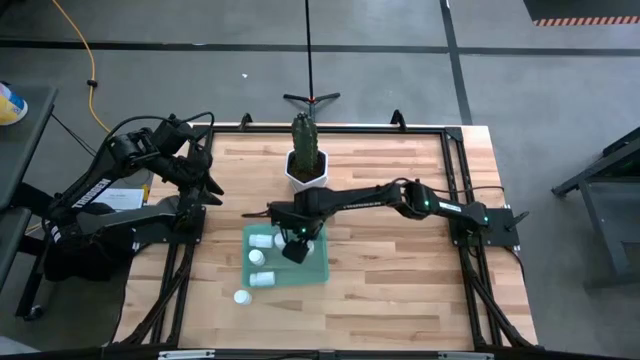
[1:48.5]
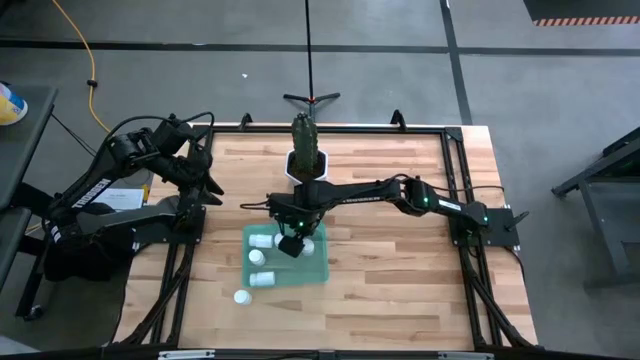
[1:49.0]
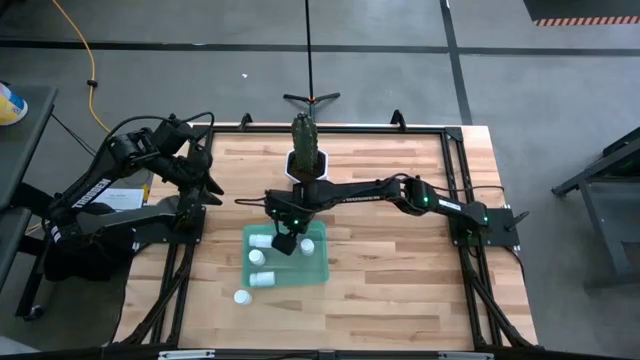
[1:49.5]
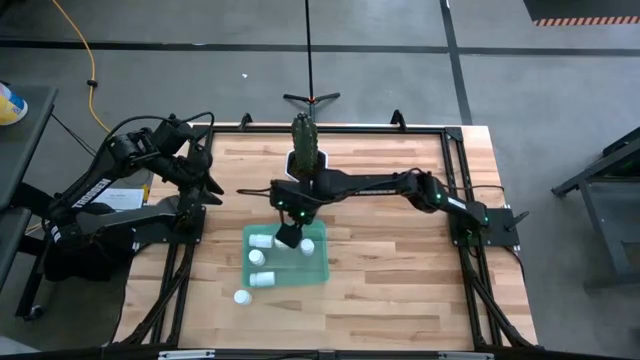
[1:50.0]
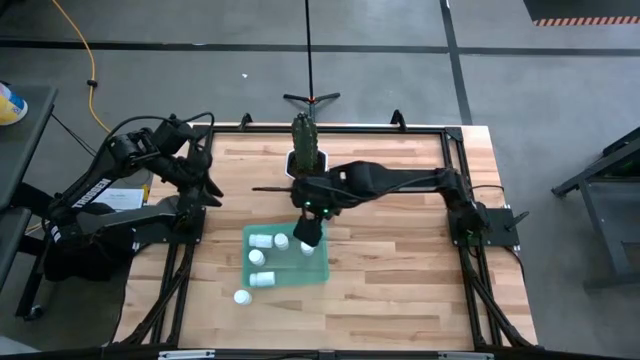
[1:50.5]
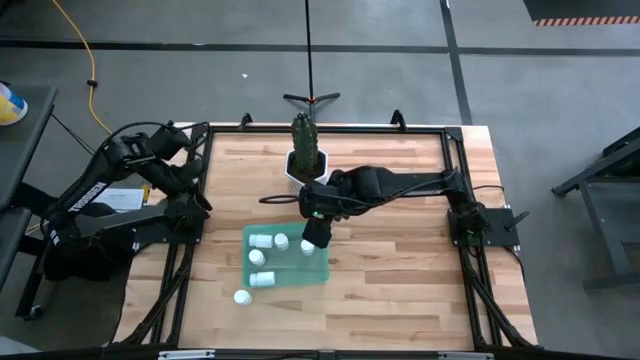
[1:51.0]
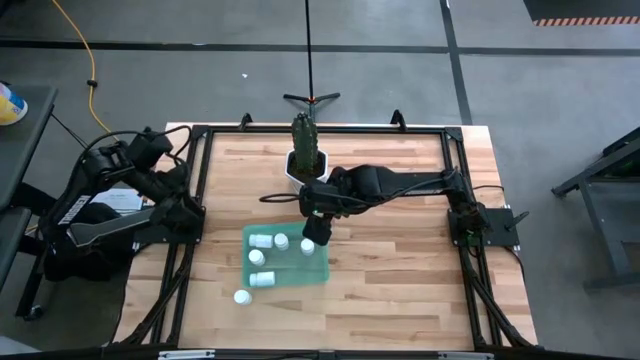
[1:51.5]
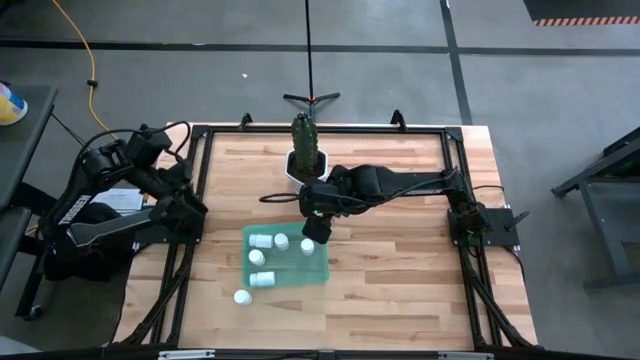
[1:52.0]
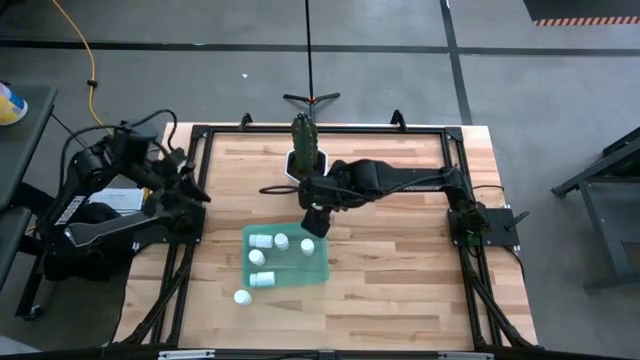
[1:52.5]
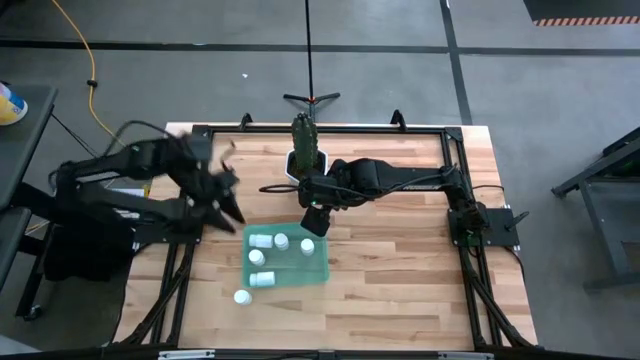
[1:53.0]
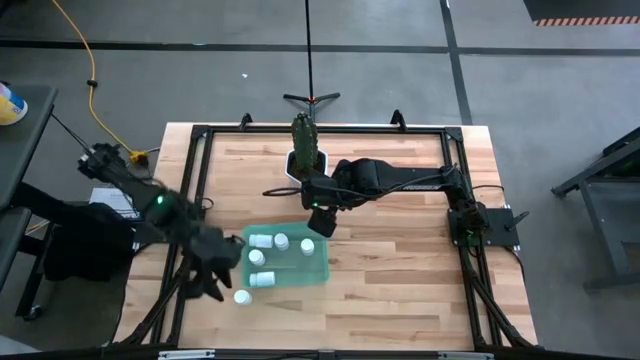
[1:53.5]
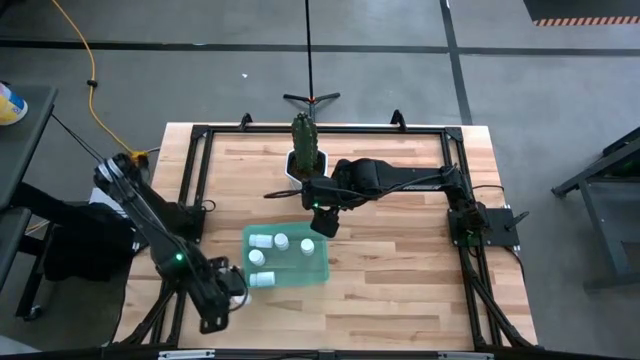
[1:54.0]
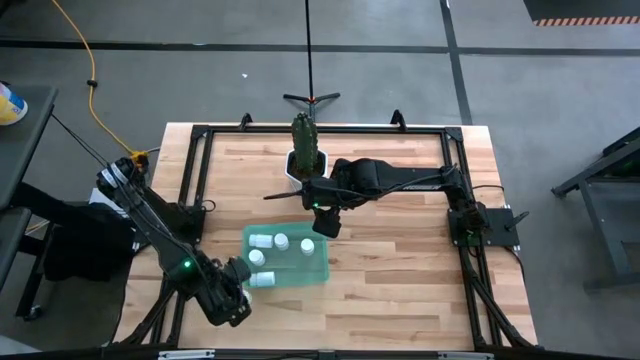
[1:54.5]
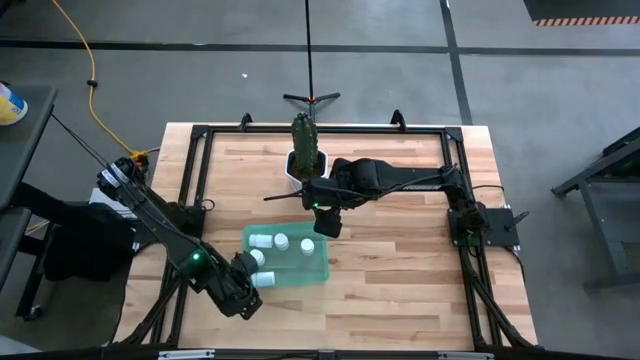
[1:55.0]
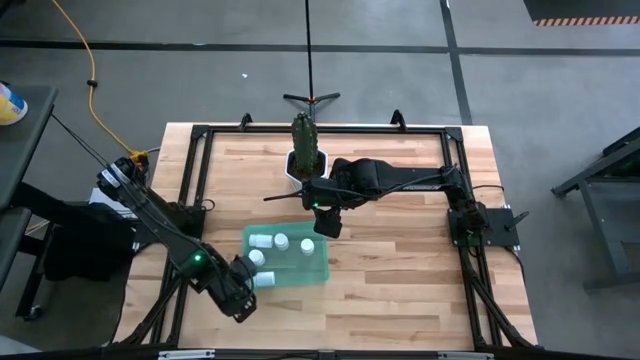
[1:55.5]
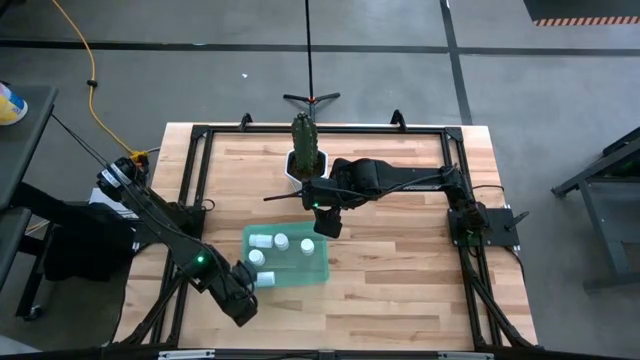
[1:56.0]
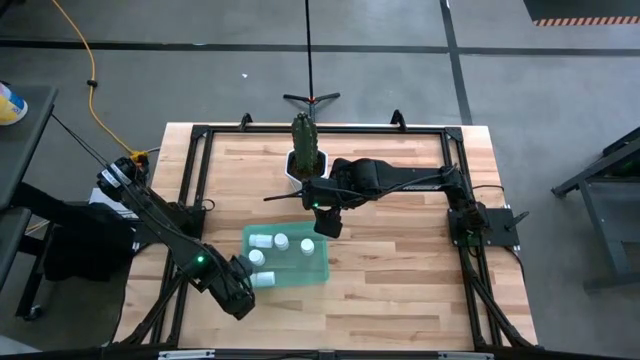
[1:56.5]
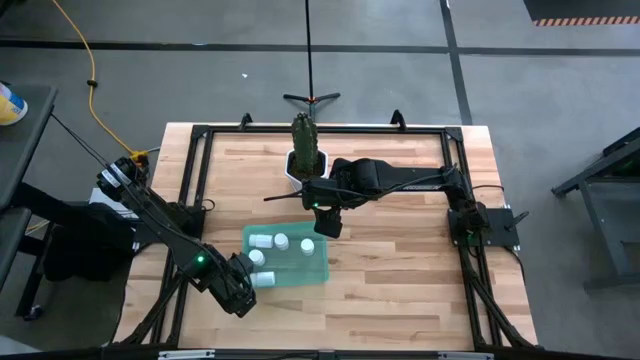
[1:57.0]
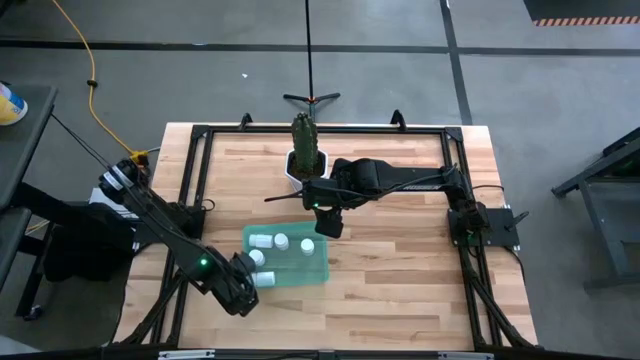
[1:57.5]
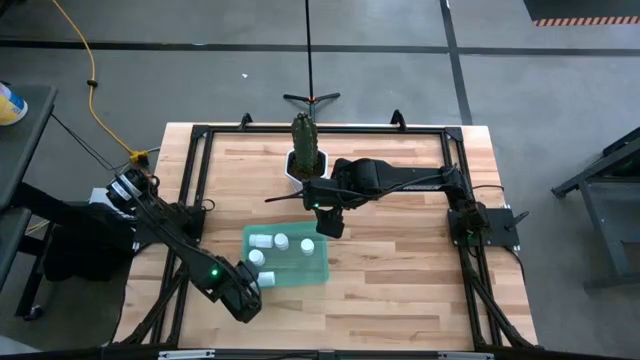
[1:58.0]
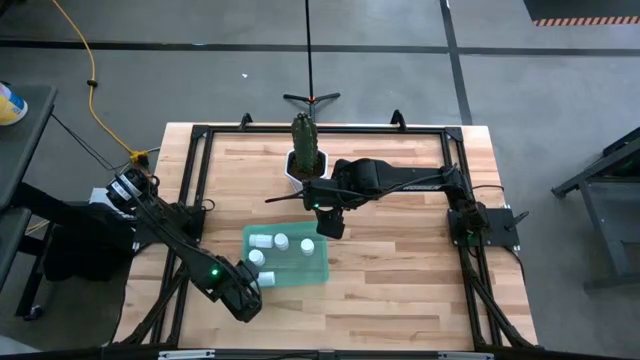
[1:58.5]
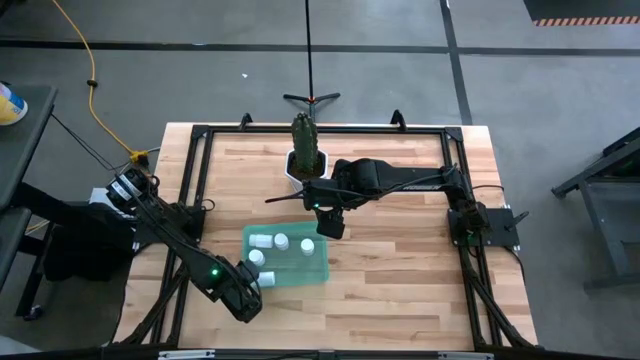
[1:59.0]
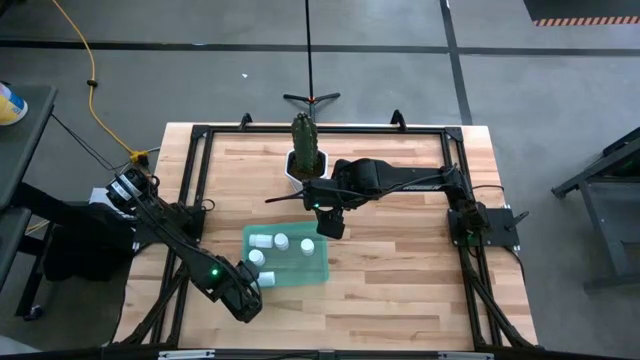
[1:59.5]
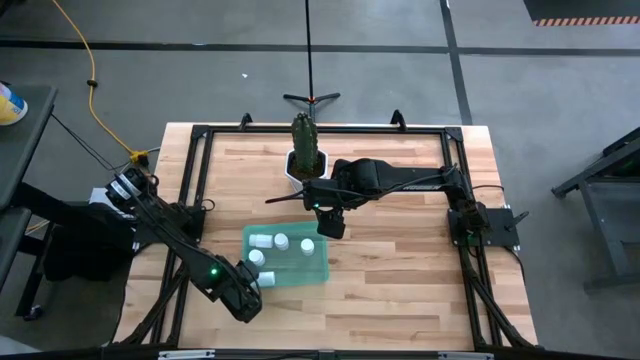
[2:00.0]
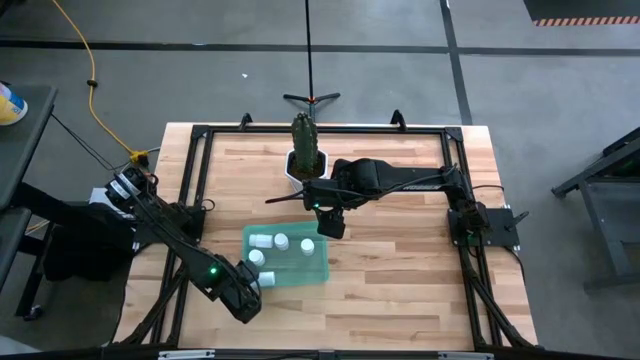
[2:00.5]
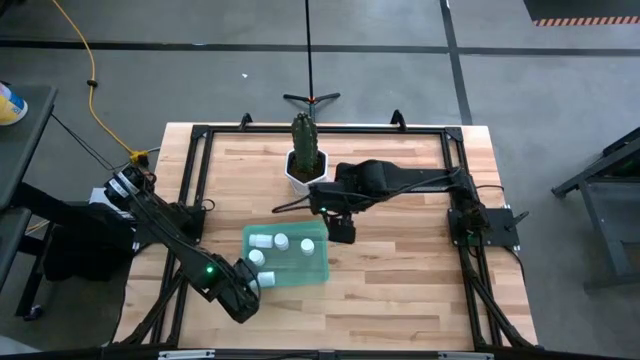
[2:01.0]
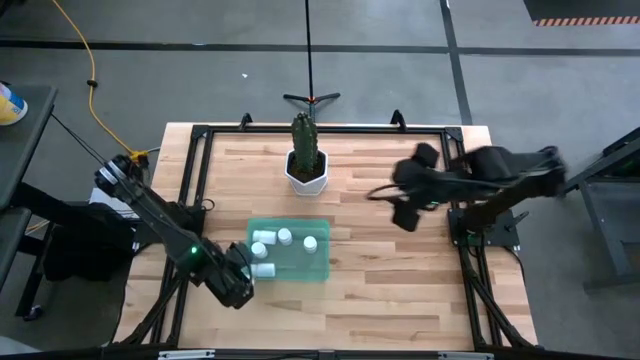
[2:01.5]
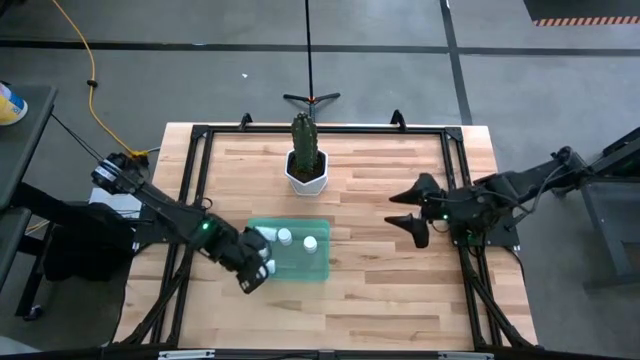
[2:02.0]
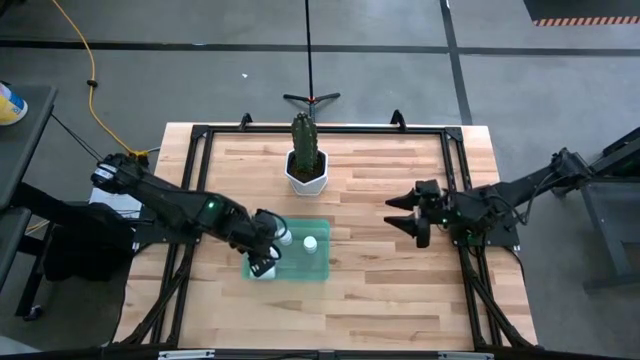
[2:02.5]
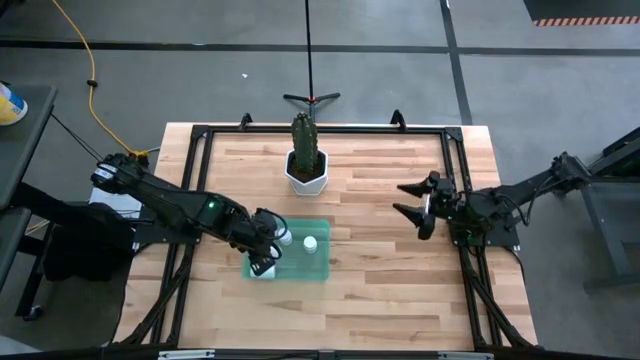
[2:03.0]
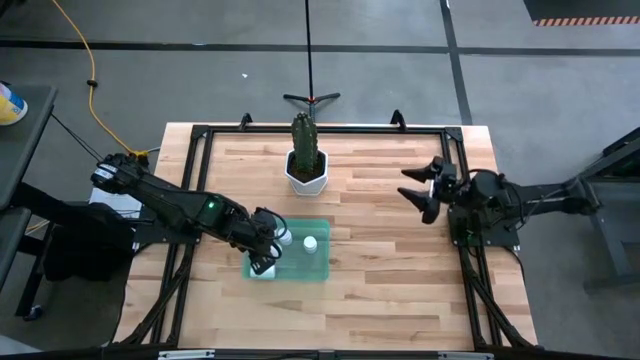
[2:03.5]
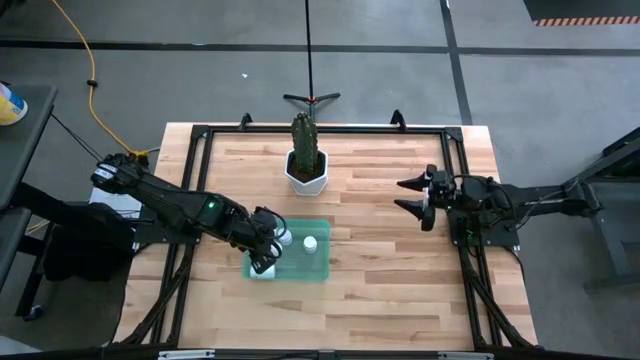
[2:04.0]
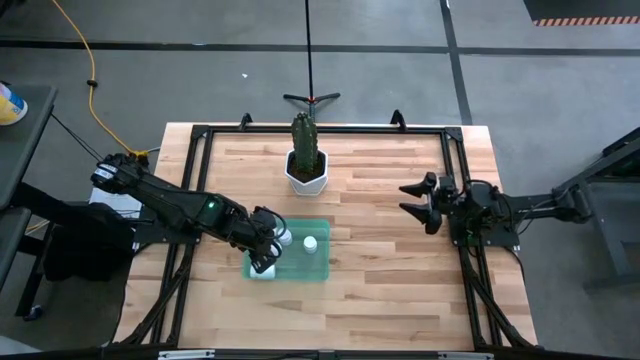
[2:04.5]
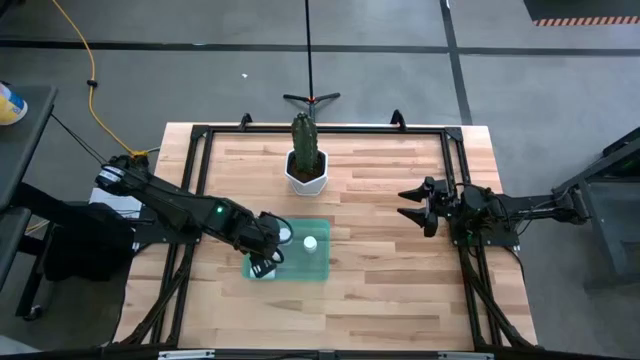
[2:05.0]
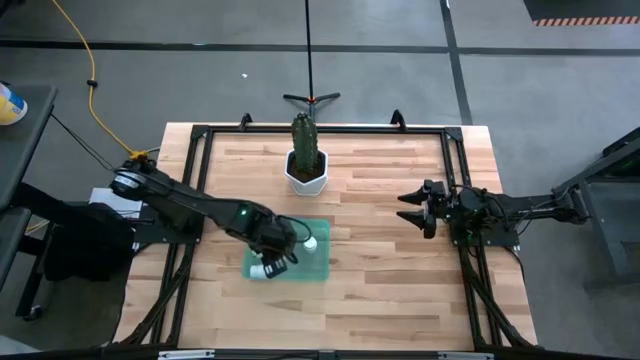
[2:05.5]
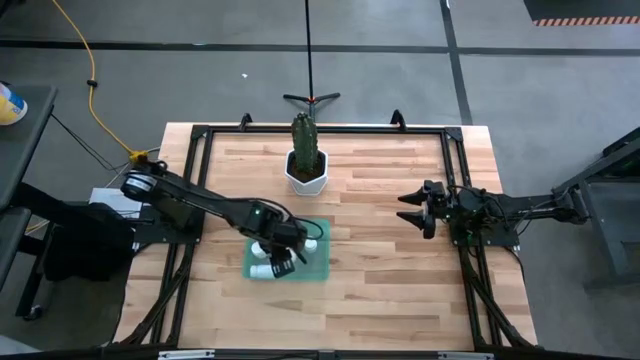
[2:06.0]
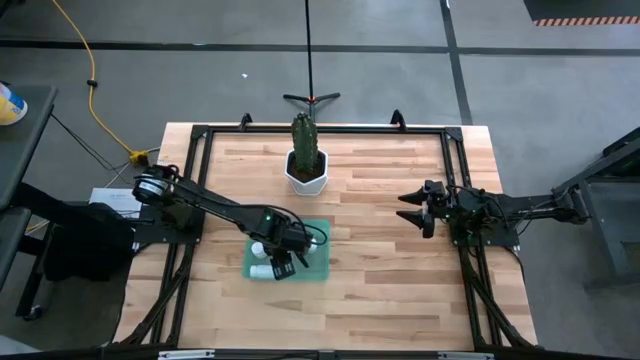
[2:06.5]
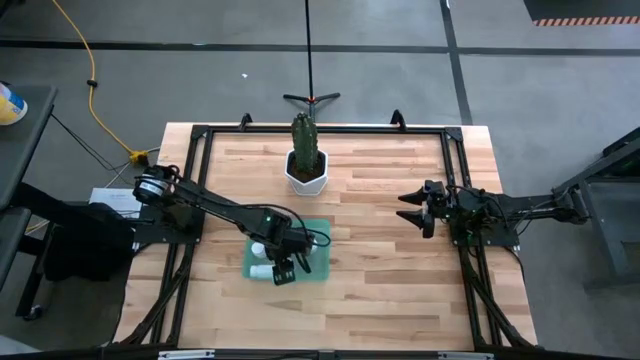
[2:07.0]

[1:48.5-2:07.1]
Task: Pick and place pill bottles into a basket
Put the white pill bottle into the green bin

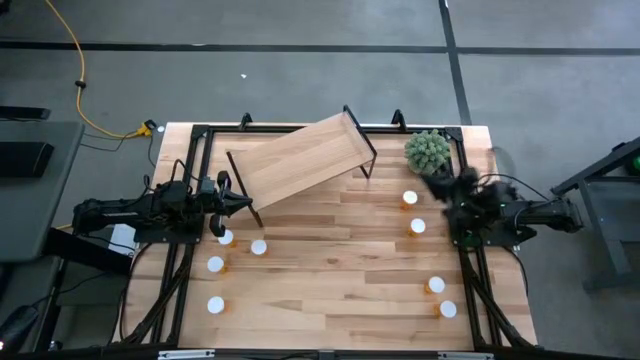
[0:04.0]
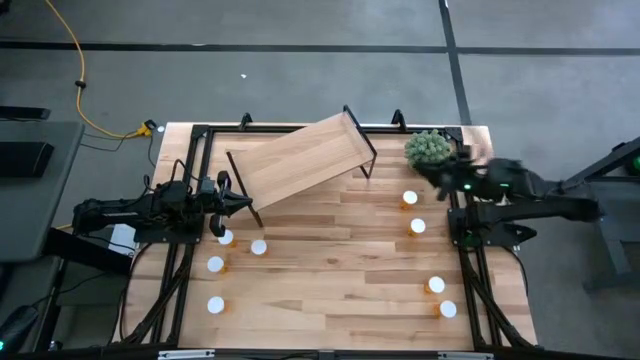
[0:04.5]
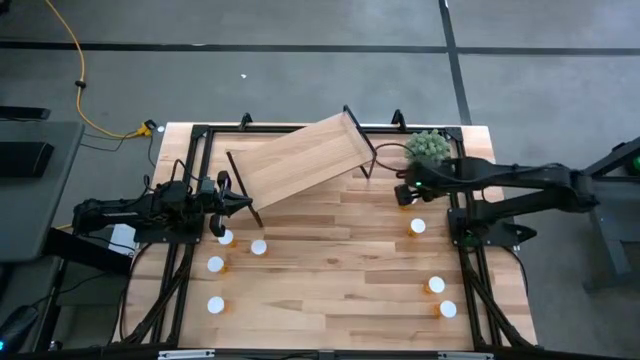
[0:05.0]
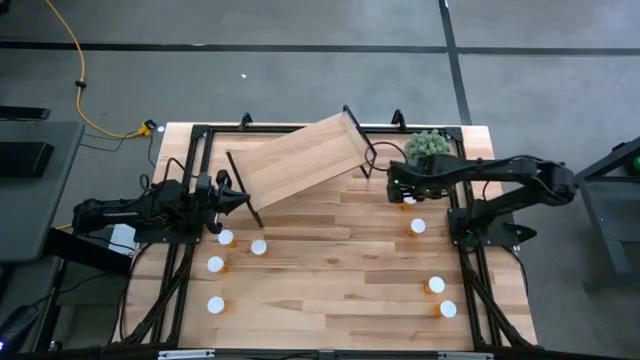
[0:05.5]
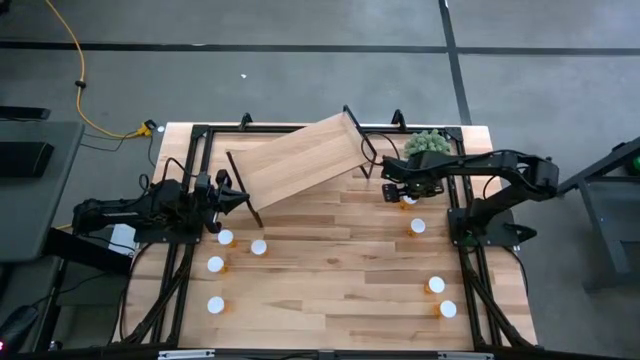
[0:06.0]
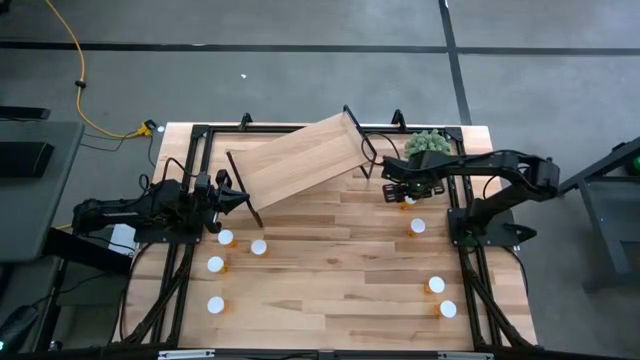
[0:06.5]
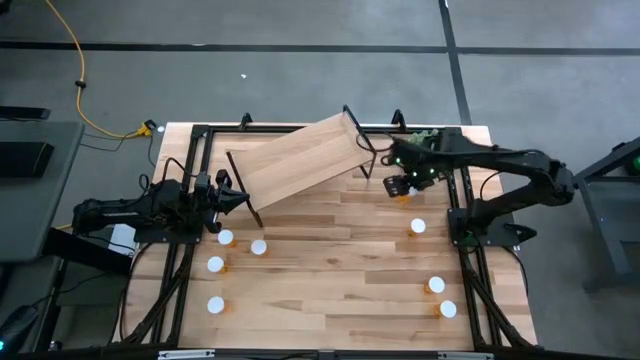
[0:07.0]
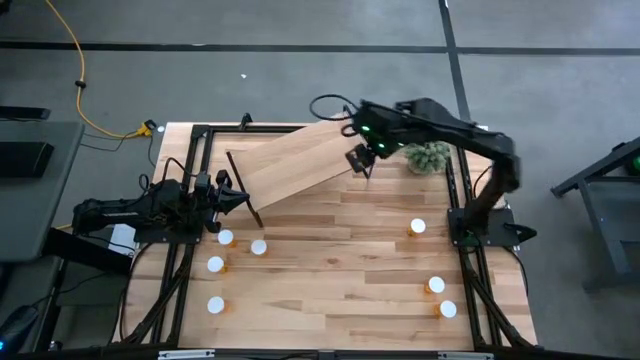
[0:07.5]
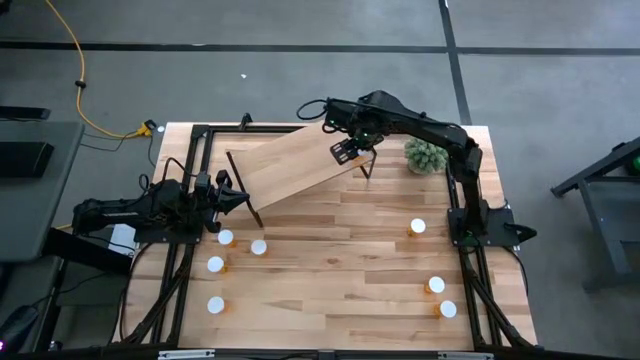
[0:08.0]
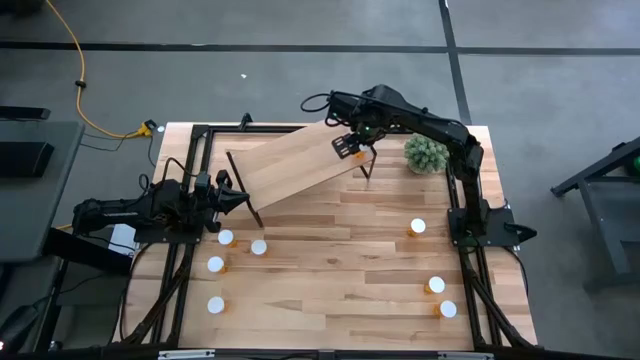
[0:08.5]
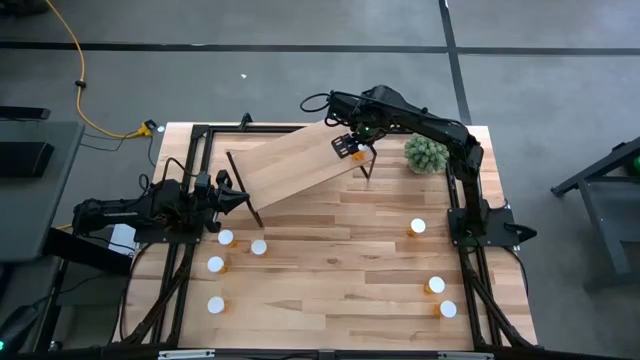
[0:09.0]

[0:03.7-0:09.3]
Task: Pick and place medicine bottles onto shelf by color
Put the pill bottle on the shelf
